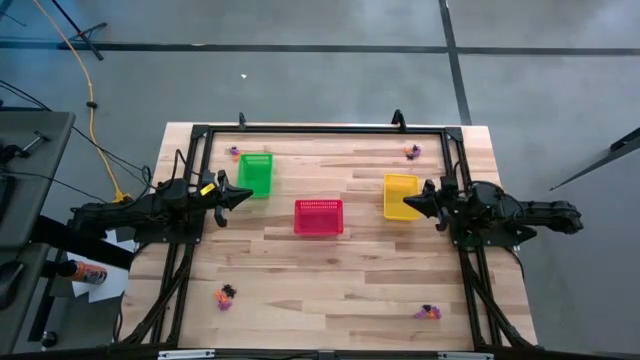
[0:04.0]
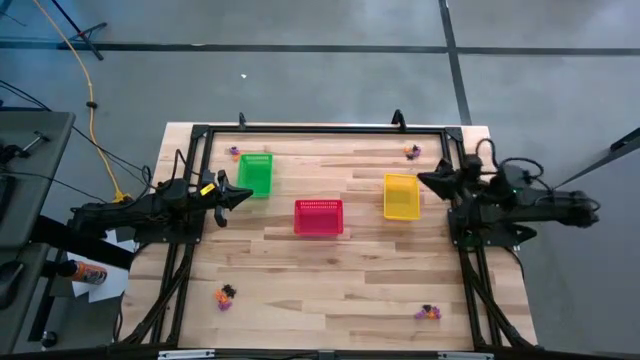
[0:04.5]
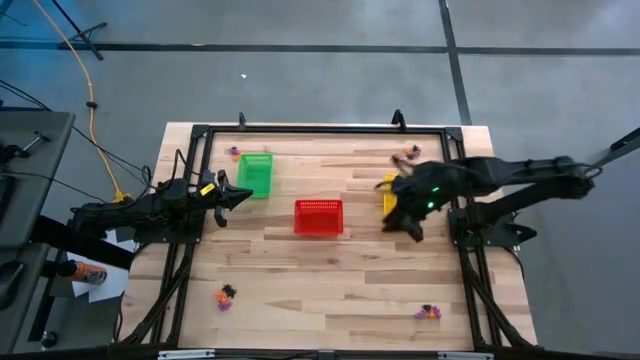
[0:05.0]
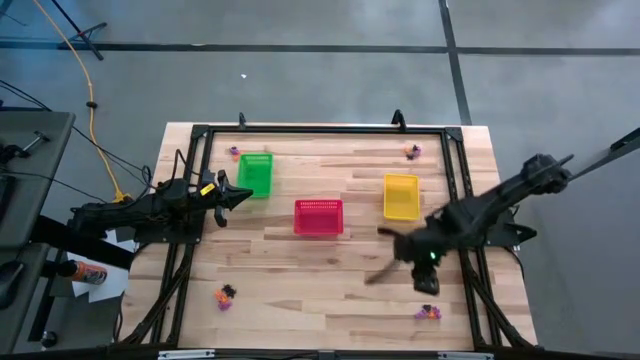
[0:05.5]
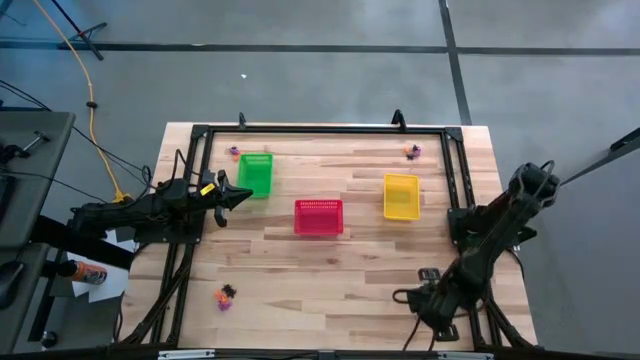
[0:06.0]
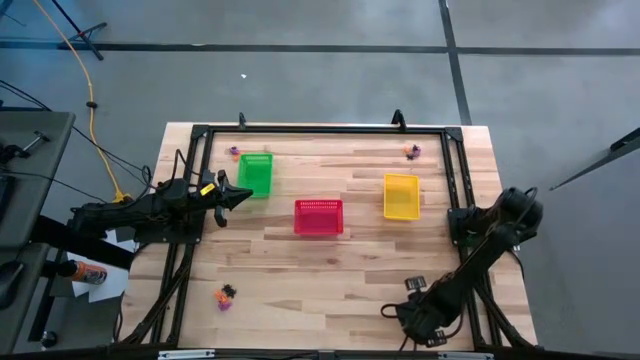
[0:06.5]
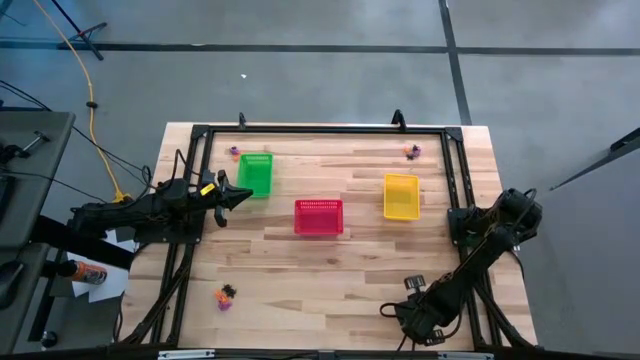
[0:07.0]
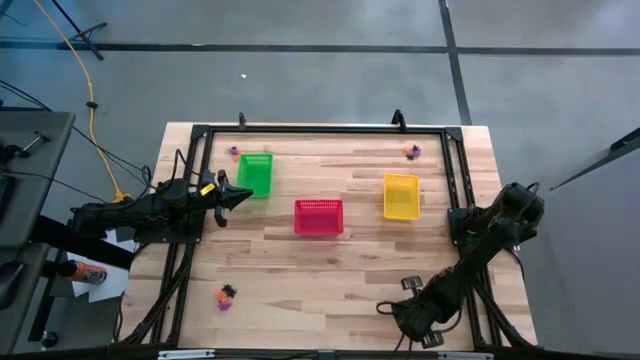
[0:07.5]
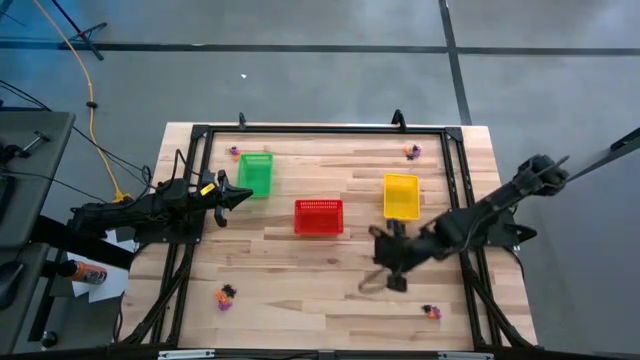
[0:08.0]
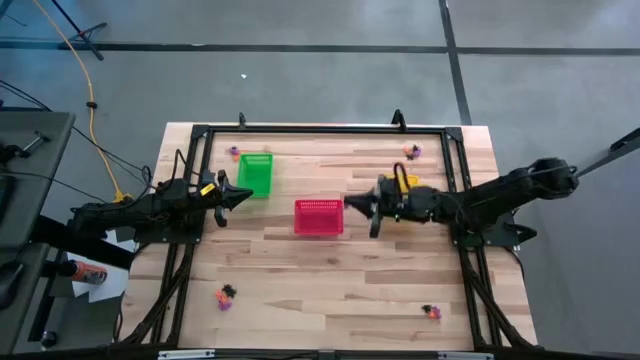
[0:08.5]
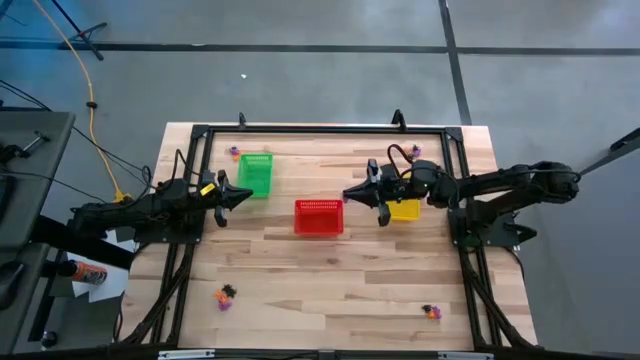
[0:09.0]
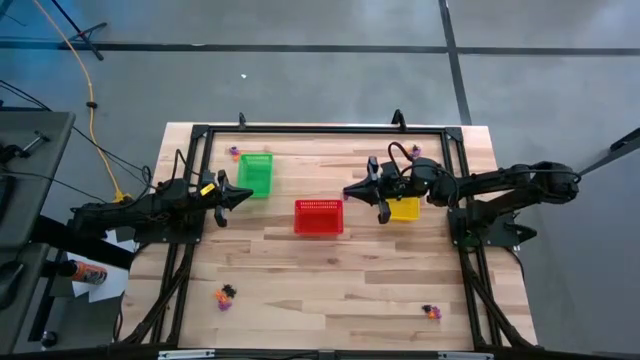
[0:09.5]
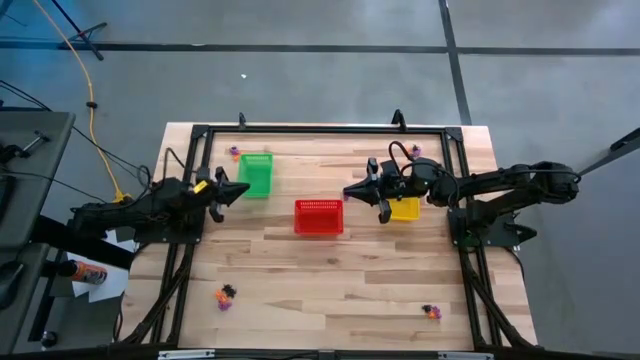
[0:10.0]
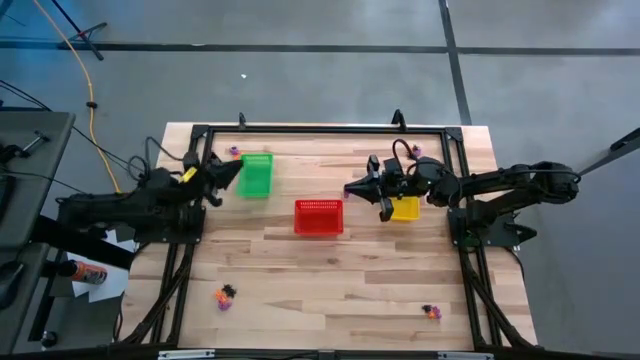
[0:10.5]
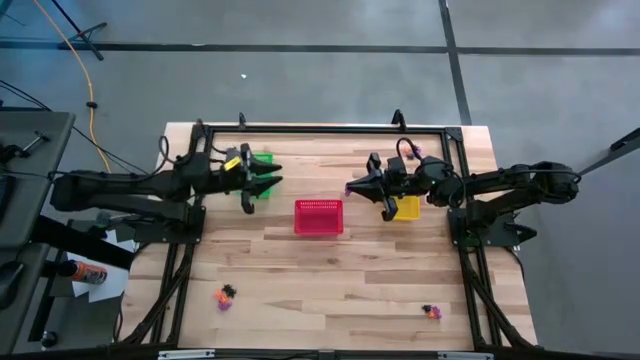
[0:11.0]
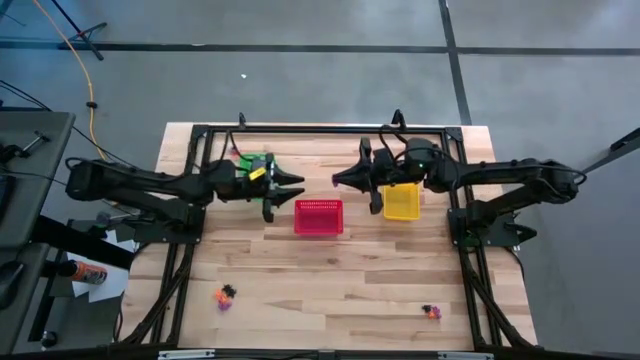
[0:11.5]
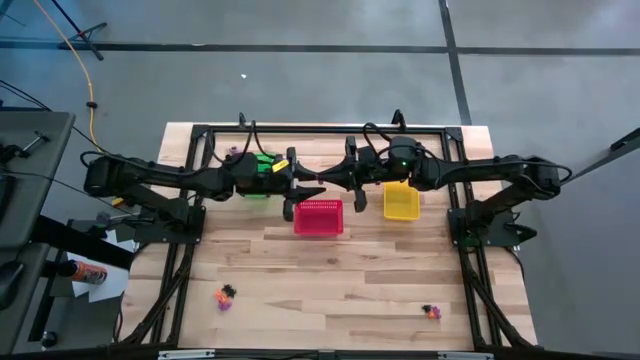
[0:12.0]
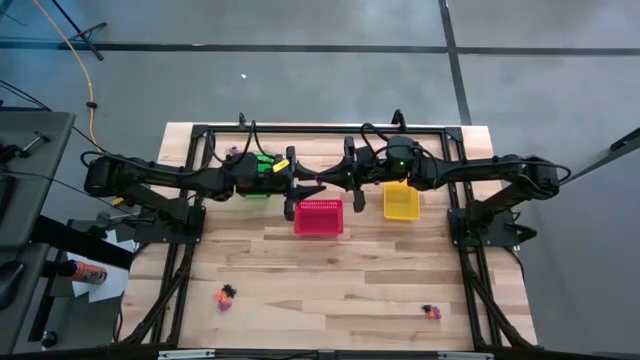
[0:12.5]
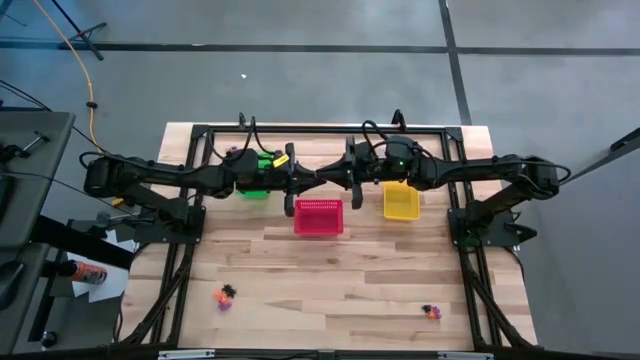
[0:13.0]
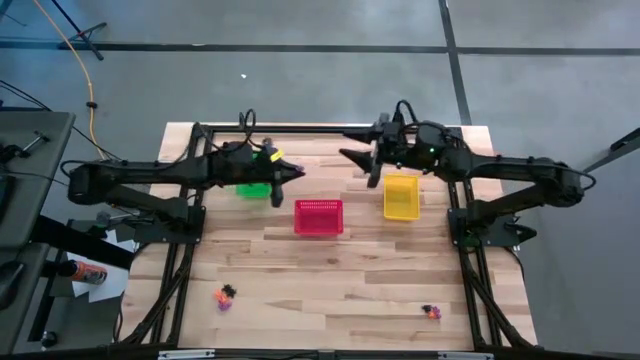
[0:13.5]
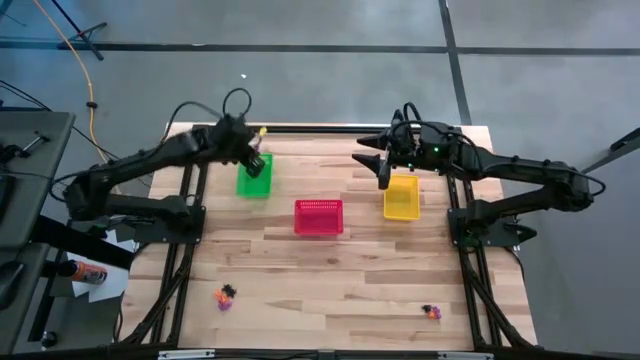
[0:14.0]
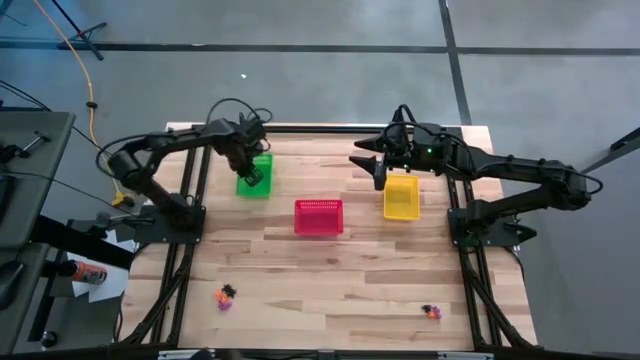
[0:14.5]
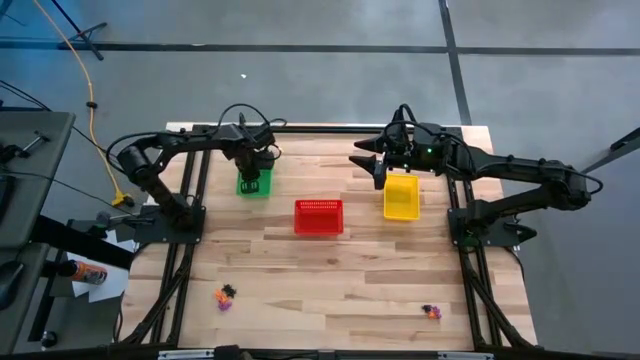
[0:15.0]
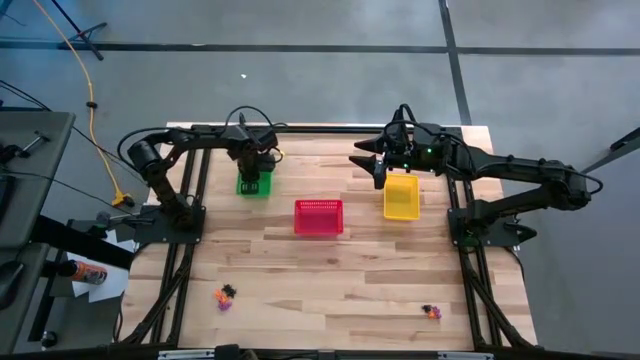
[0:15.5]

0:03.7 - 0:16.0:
Task: Sort Halloween decoration
Put the purple skeleton toy into the green bin

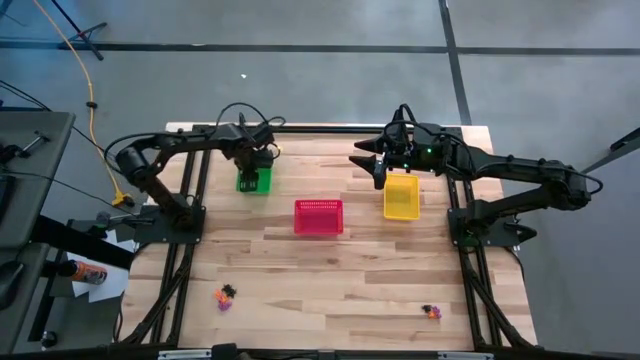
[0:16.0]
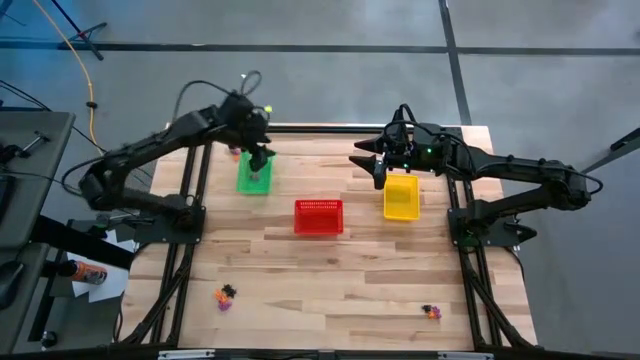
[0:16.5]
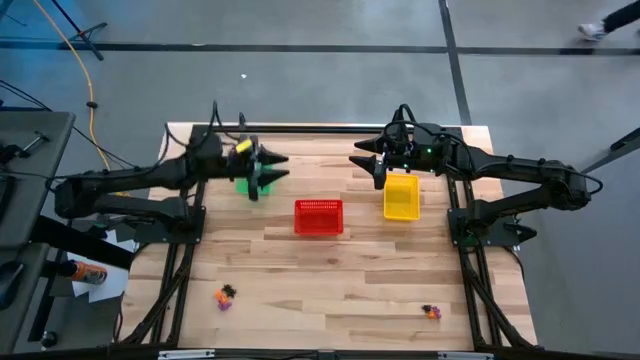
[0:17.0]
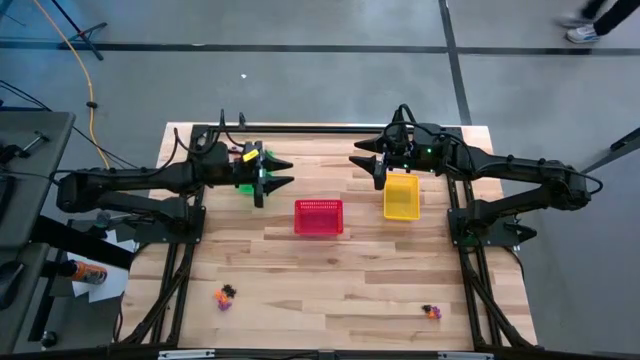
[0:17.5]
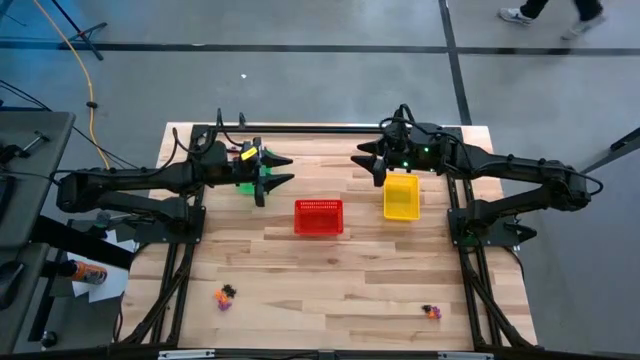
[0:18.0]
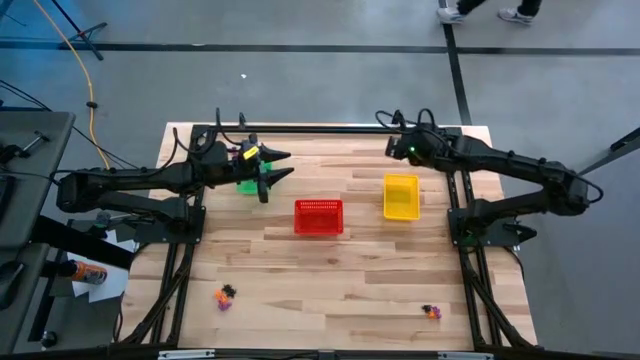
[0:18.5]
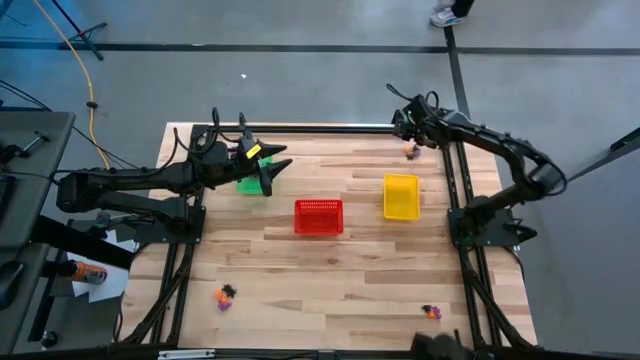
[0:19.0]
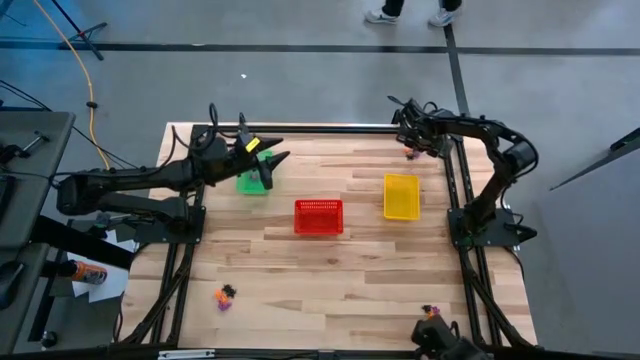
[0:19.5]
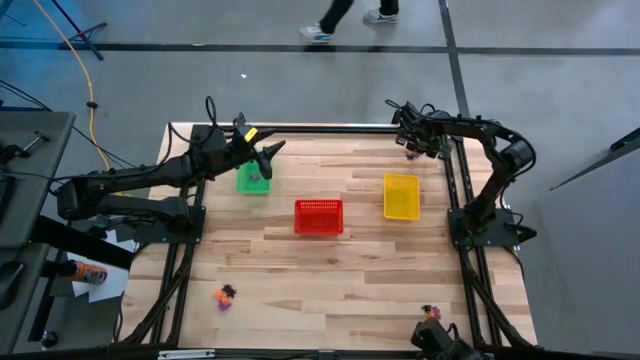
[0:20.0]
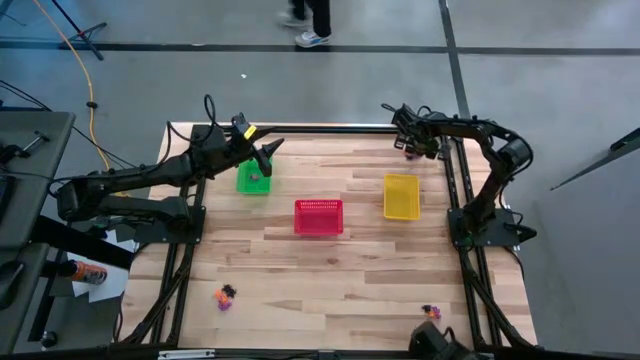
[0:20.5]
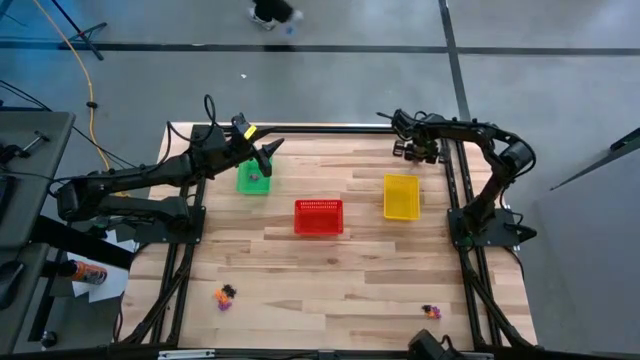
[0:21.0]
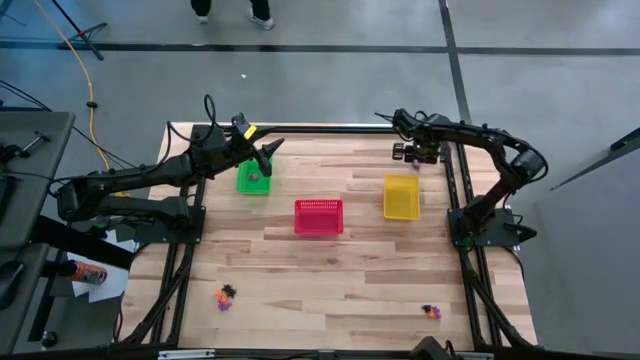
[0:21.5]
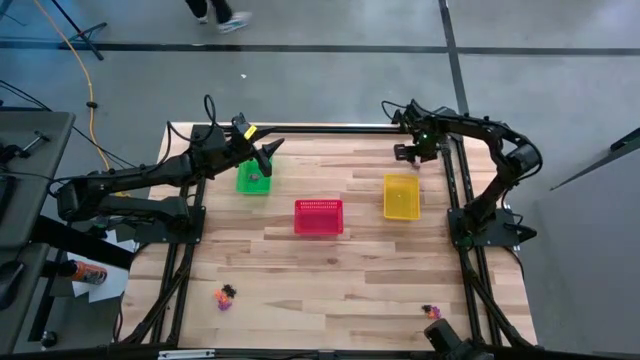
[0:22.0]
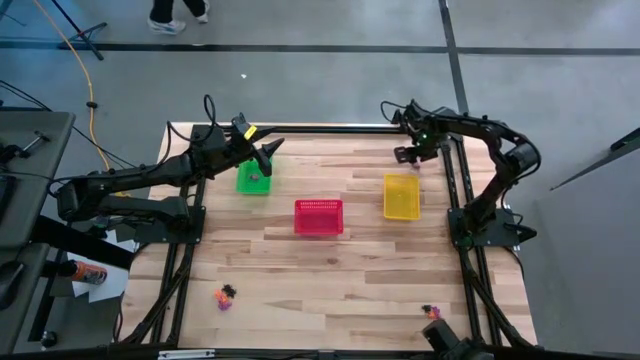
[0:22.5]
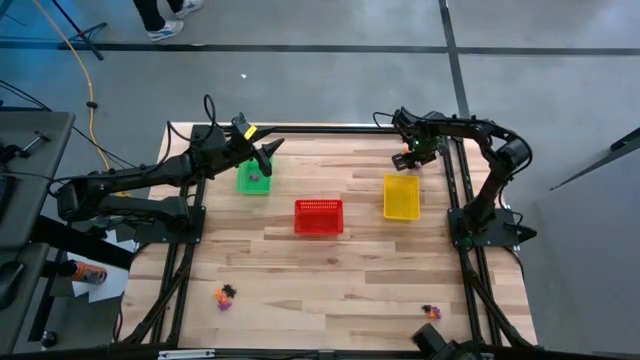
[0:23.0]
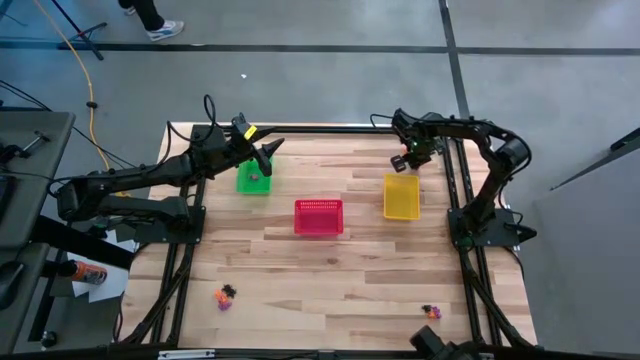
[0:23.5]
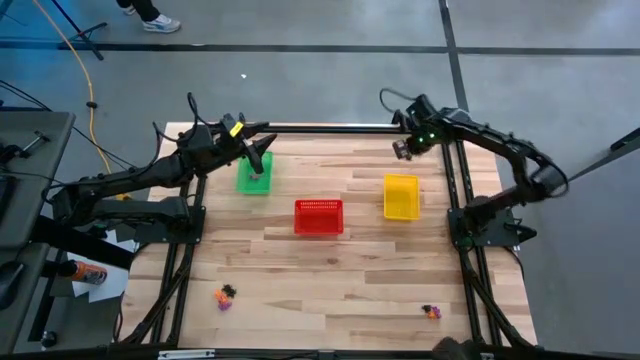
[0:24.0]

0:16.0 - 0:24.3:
Put the purple skeleton toy into the green bin
